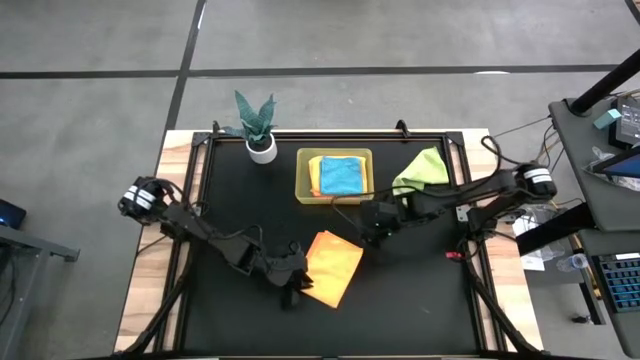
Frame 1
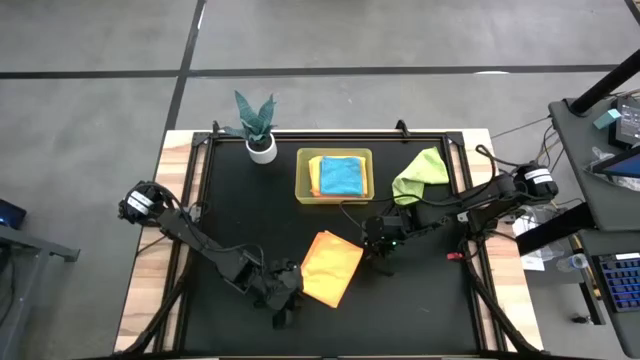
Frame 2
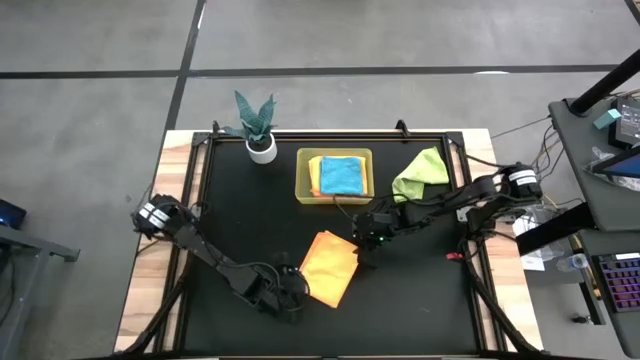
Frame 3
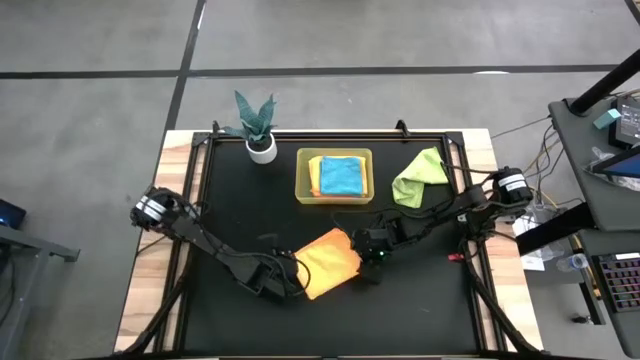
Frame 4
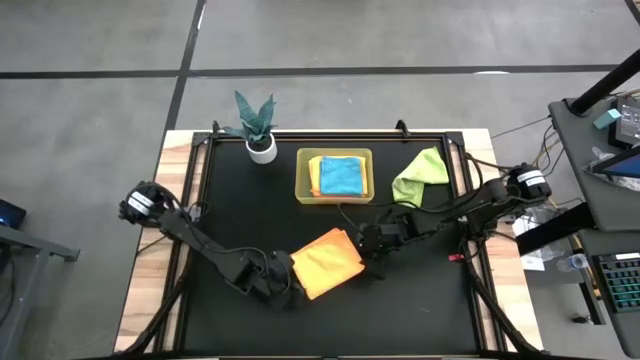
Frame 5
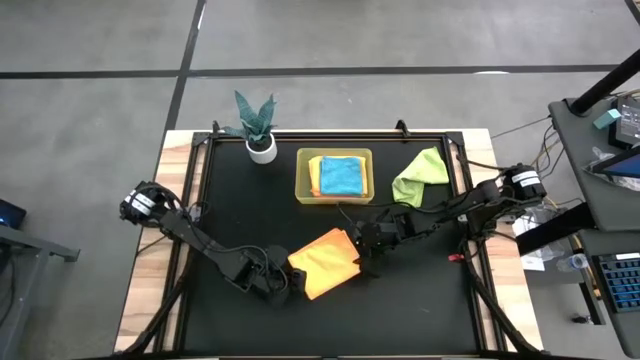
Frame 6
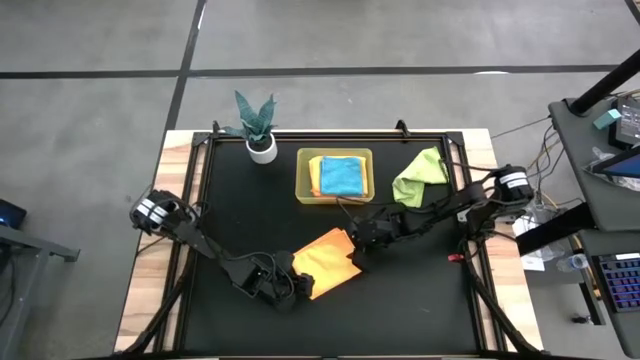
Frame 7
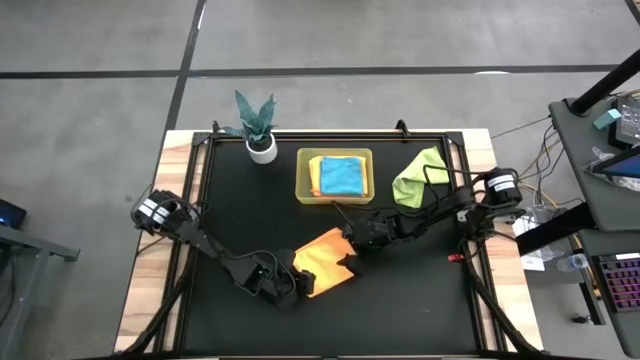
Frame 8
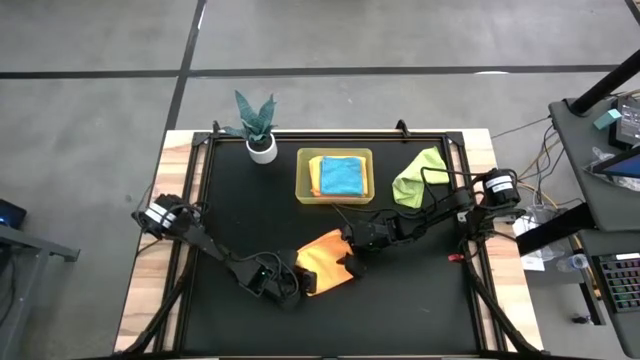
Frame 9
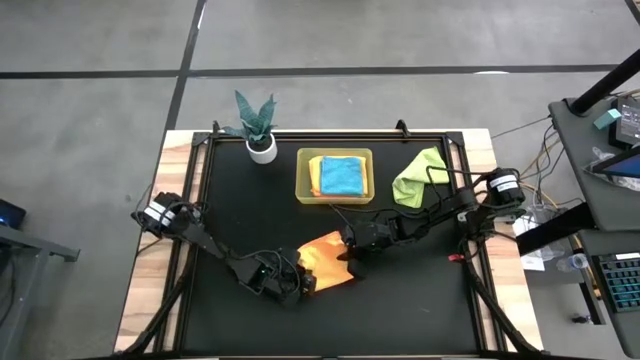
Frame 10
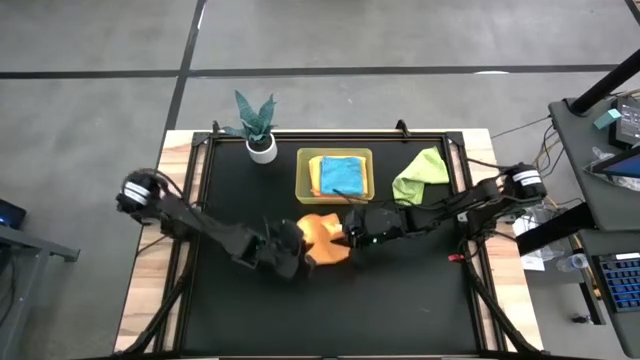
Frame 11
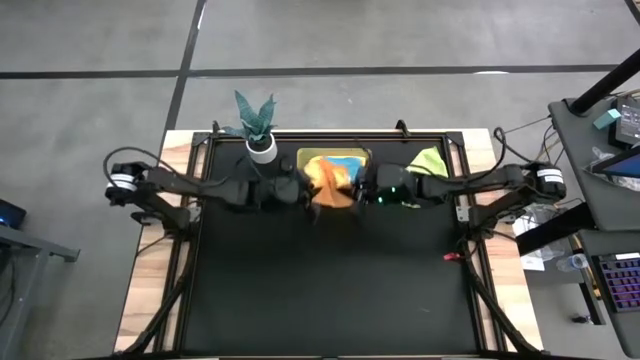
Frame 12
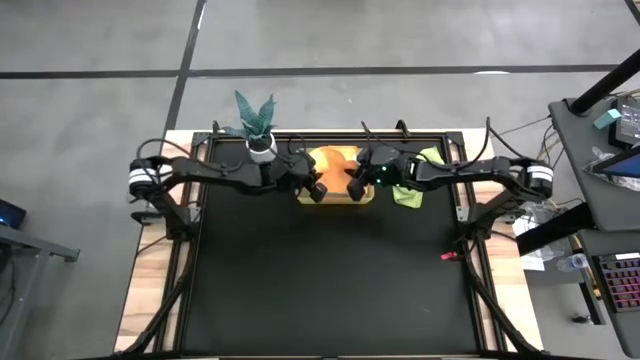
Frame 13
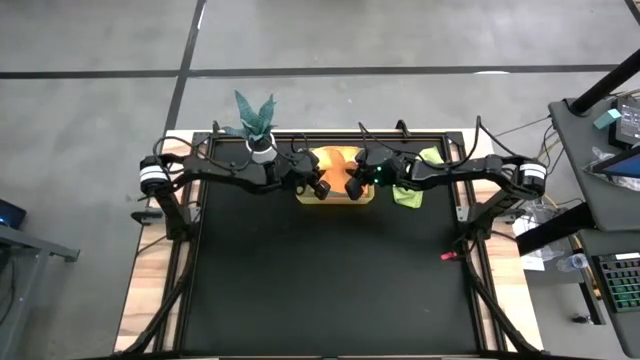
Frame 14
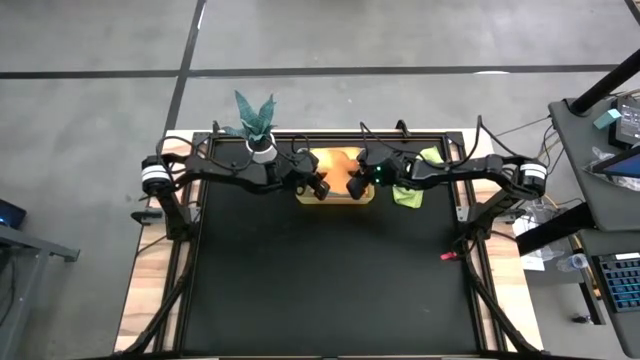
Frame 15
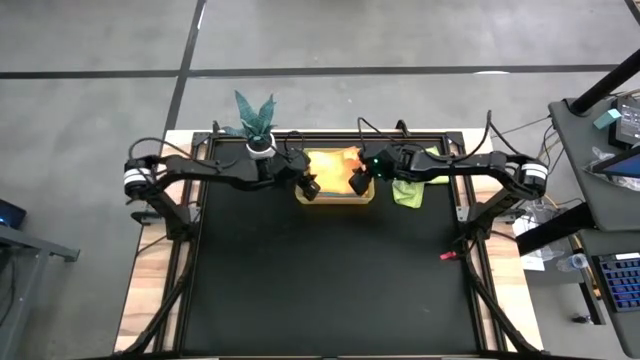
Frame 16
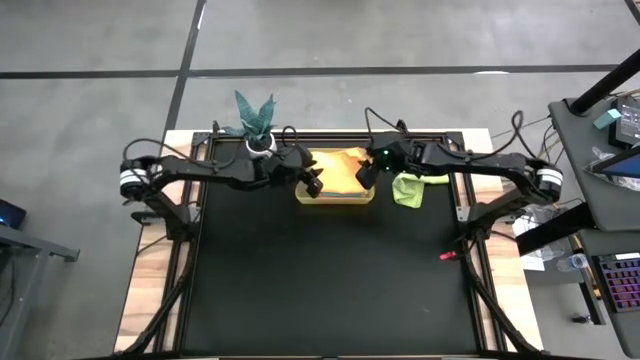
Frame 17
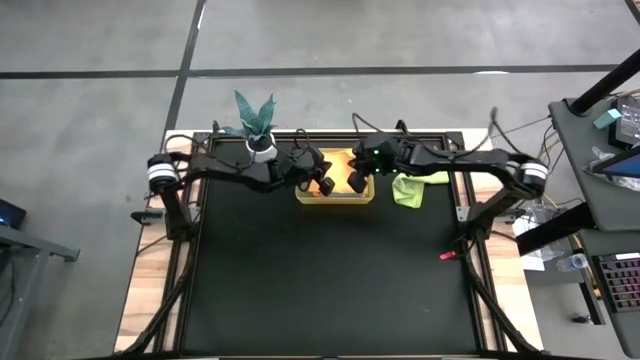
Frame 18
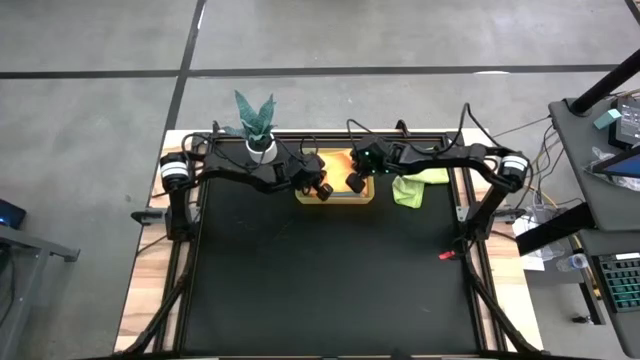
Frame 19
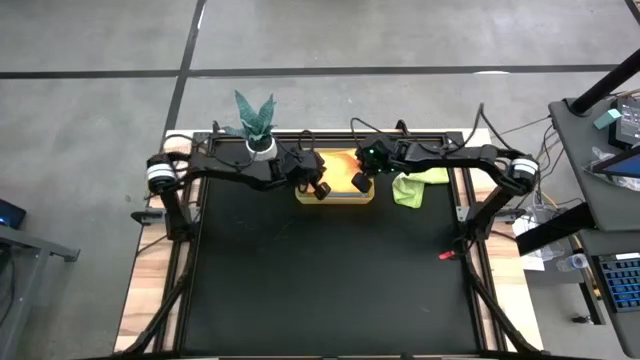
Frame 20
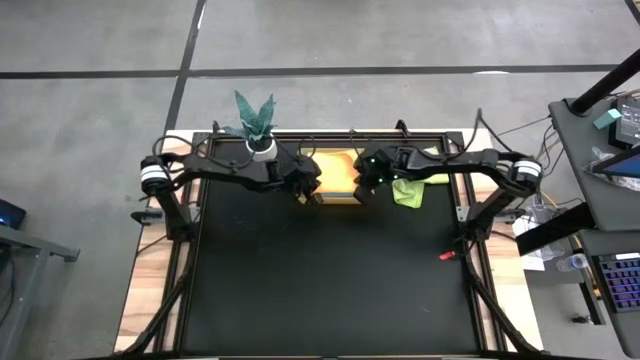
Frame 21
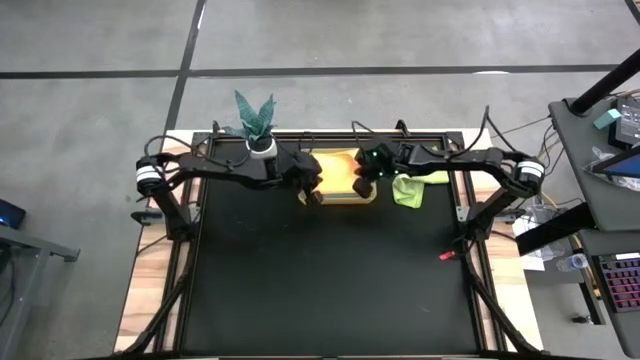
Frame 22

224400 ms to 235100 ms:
Task: Fold microfiber towels
Put the folded yellow towel into the bin
